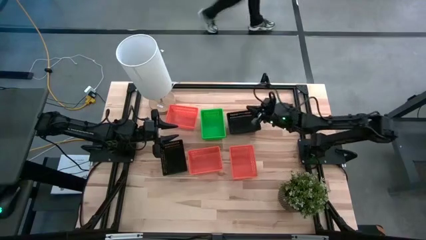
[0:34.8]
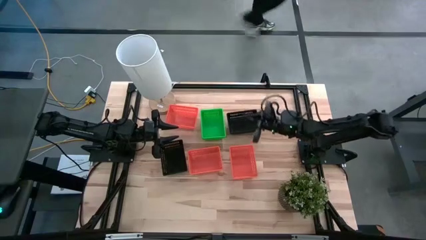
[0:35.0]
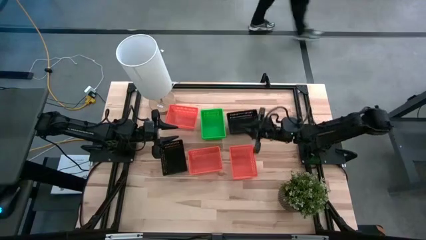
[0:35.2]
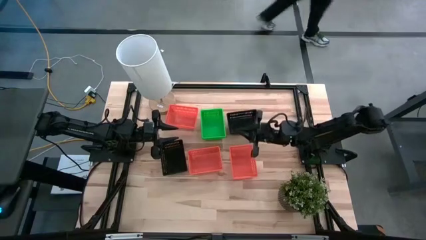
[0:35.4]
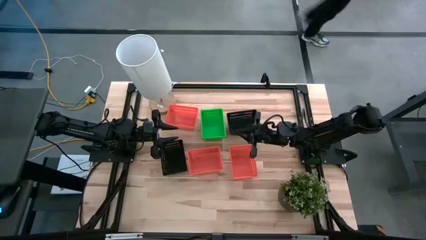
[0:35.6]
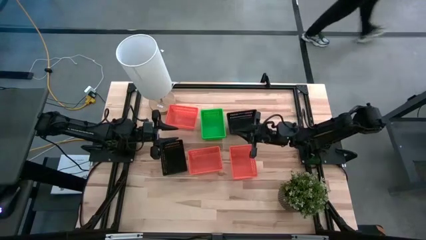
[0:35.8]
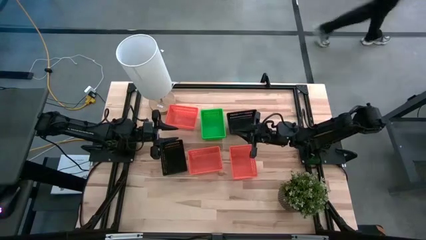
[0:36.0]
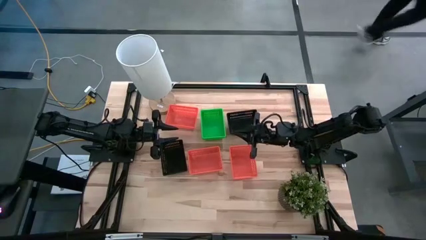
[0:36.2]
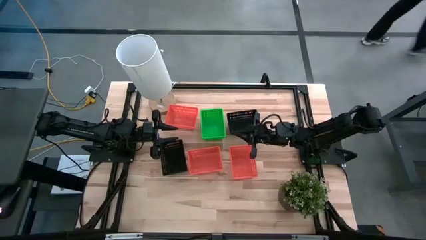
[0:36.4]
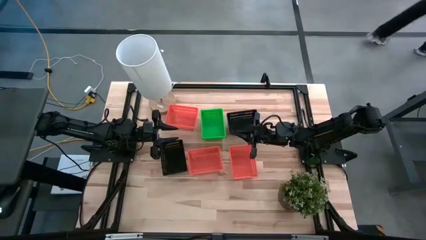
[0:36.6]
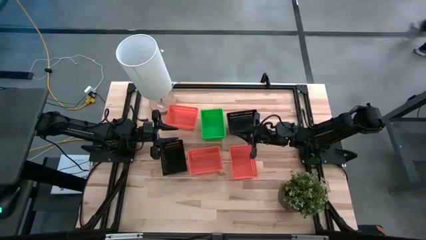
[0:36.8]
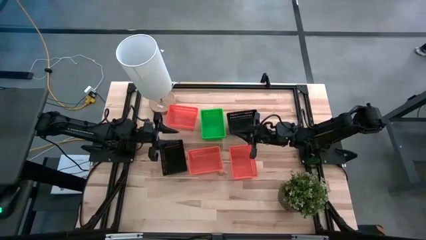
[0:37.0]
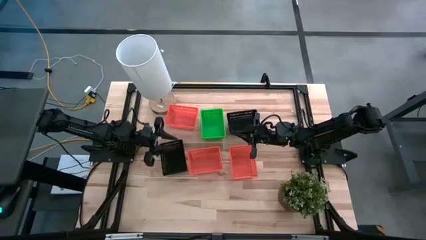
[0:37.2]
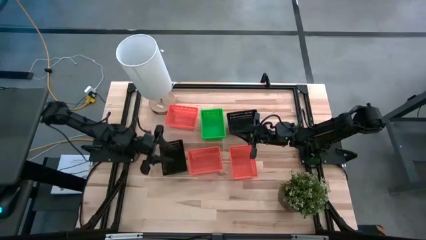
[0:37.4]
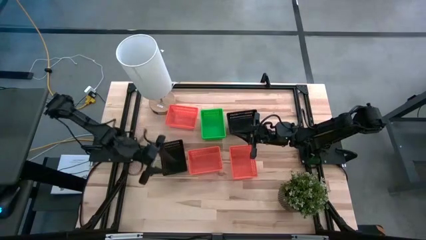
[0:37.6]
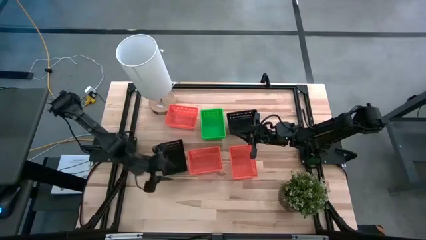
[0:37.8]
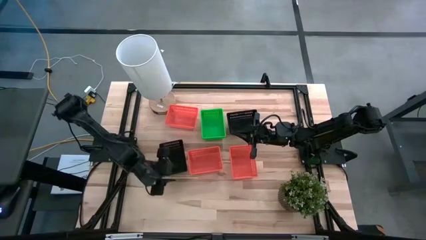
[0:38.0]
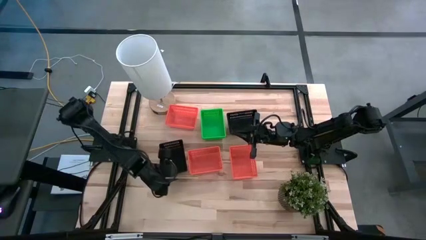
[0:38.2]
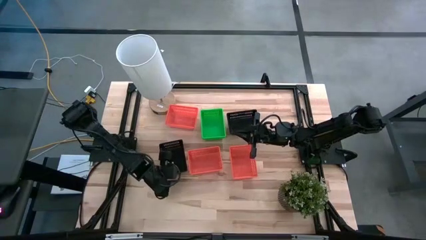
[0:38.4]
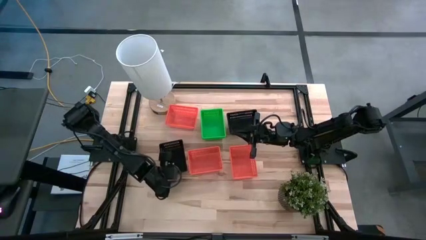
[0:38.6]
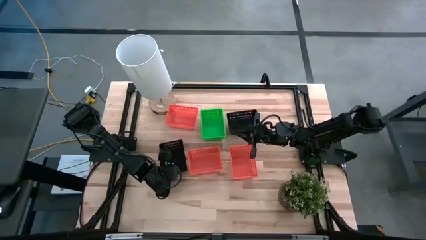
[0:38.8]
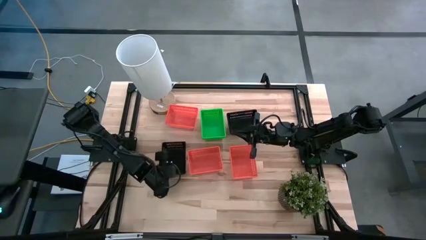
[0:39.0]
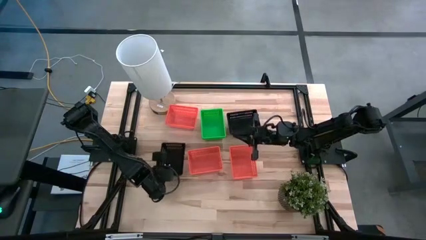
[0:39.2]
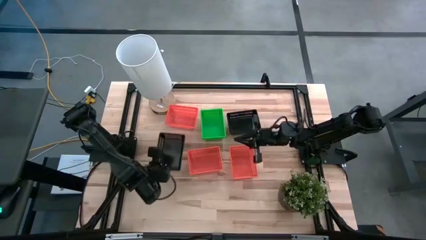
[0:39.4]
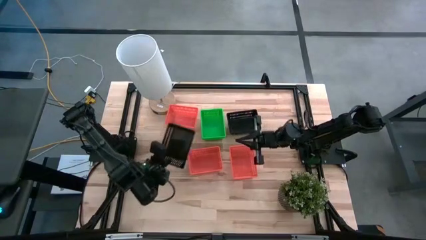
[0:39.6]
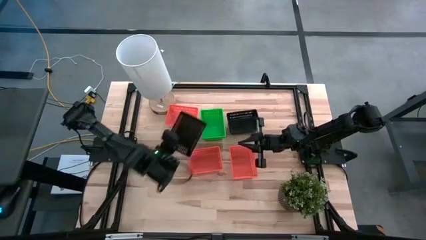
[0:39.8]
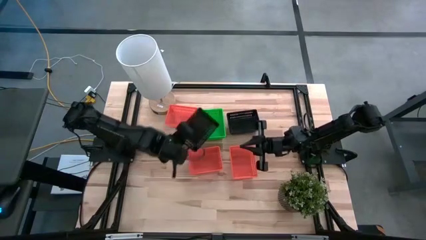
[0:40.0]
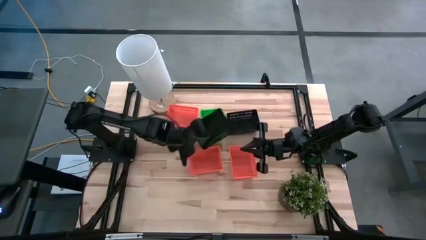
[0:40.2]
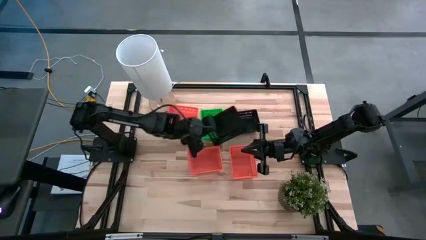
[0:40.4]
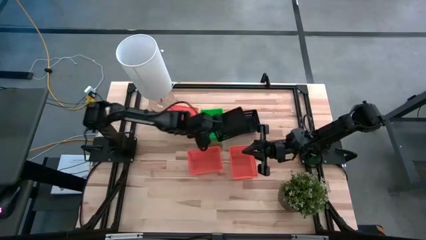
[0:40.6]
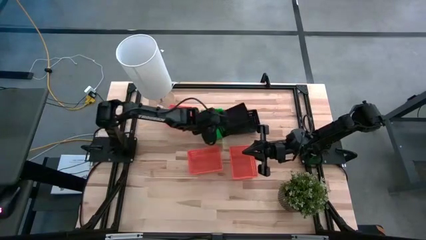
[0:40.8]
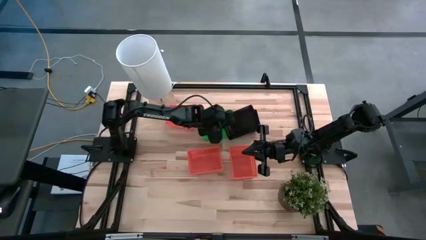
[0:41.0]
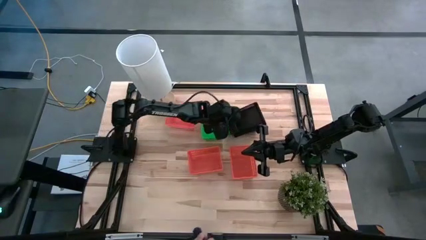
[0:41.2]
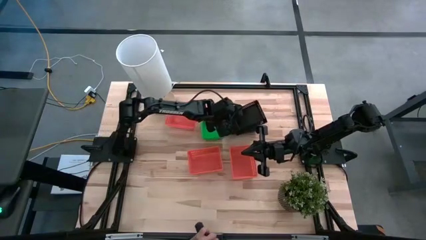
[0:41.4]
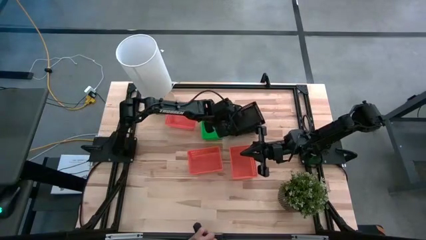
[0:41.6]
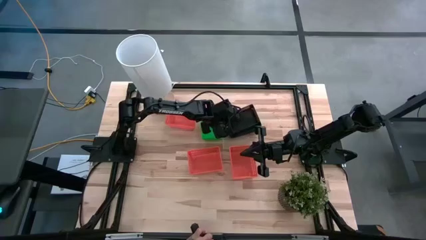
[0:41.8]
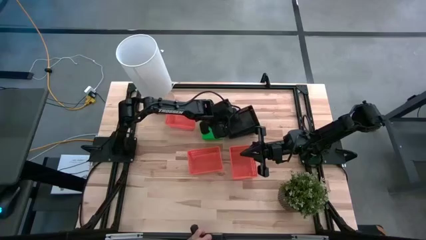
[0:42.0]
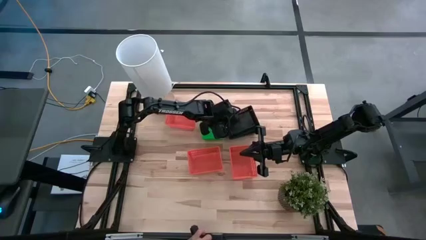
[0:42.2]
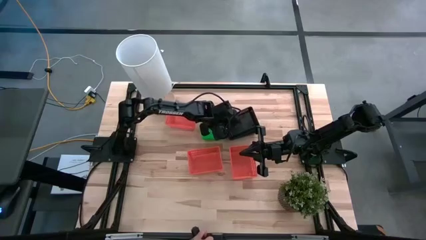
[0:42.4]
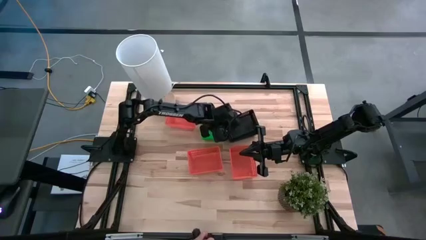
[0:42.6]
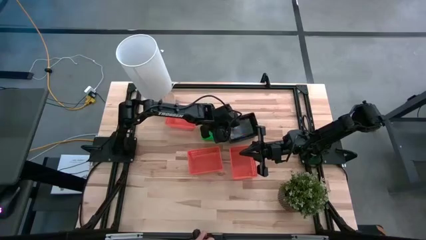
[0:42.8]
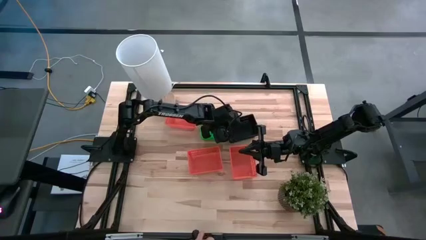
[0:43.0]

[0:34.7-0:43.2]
Stack the bottom black bin on top of the top black bin

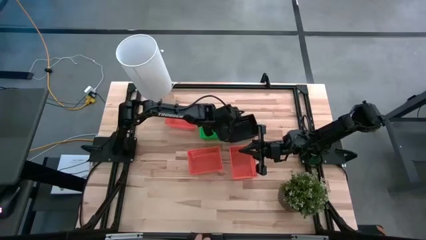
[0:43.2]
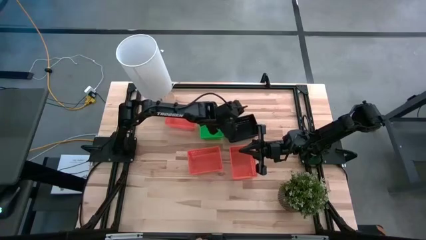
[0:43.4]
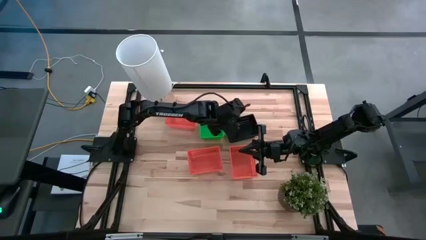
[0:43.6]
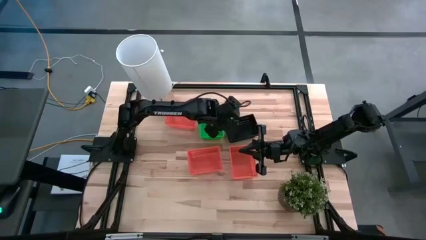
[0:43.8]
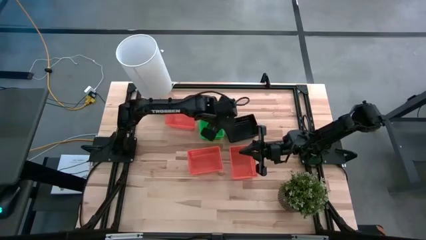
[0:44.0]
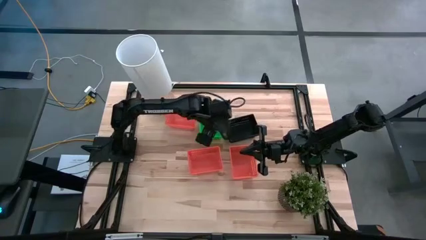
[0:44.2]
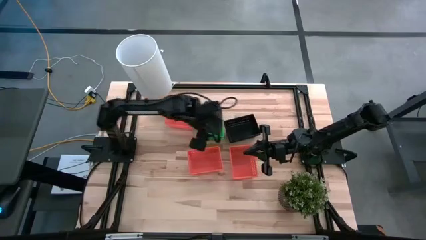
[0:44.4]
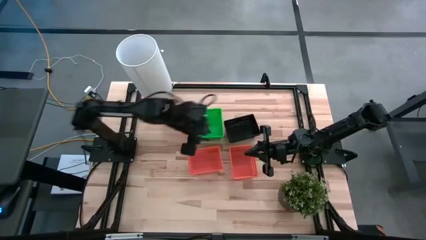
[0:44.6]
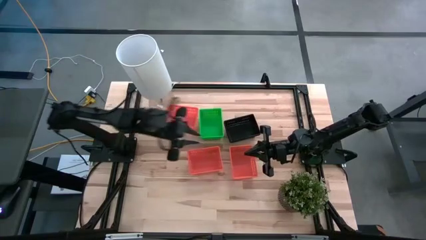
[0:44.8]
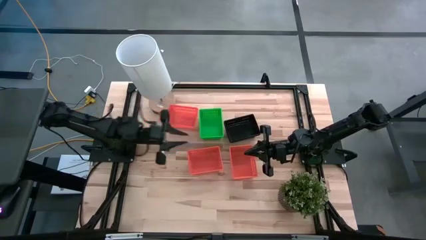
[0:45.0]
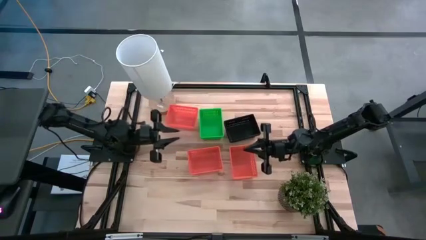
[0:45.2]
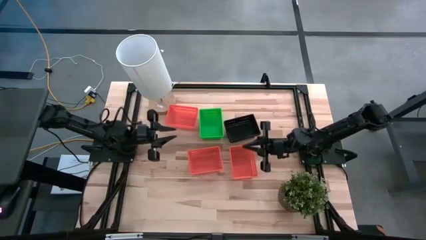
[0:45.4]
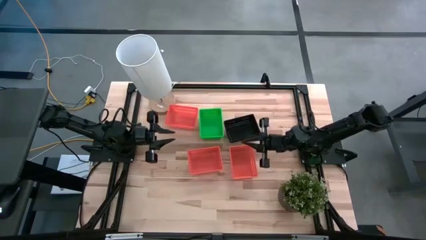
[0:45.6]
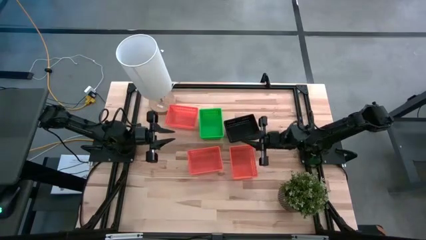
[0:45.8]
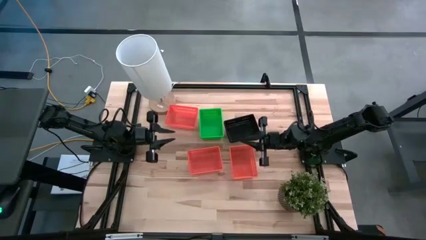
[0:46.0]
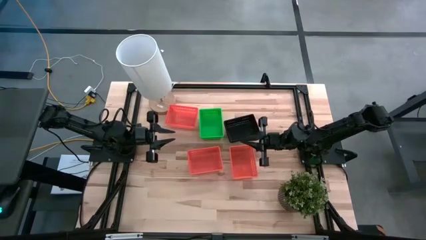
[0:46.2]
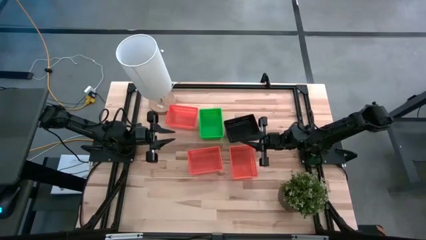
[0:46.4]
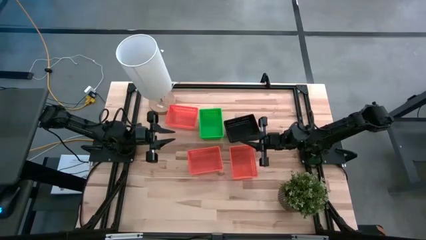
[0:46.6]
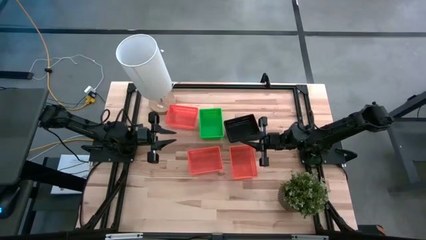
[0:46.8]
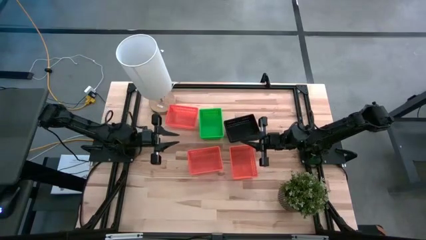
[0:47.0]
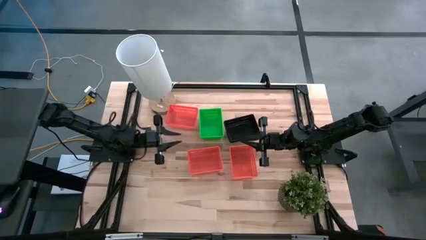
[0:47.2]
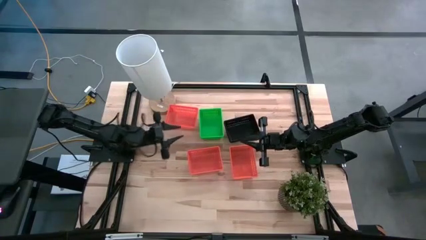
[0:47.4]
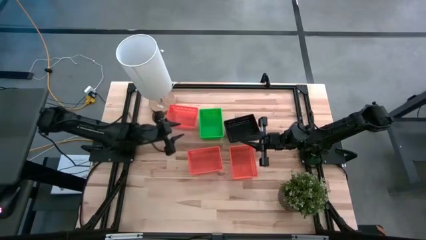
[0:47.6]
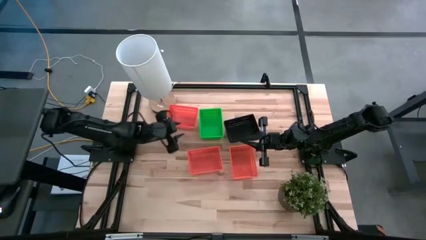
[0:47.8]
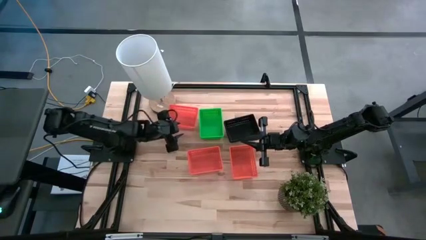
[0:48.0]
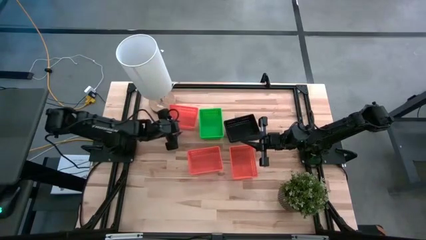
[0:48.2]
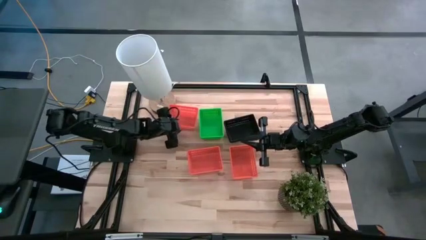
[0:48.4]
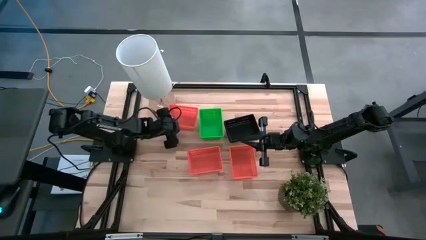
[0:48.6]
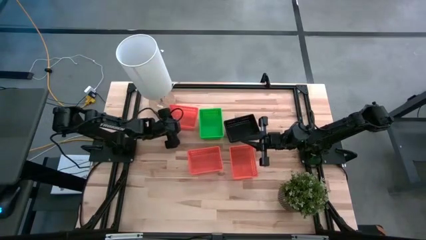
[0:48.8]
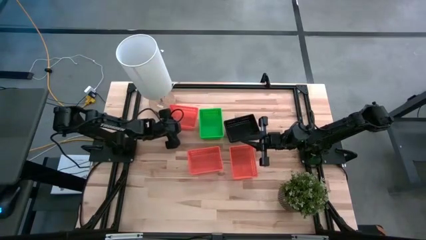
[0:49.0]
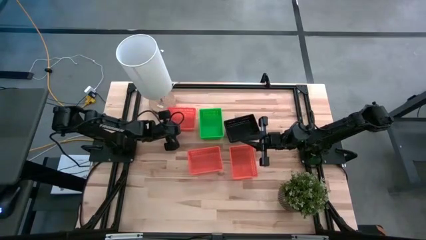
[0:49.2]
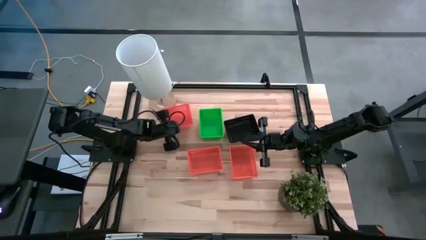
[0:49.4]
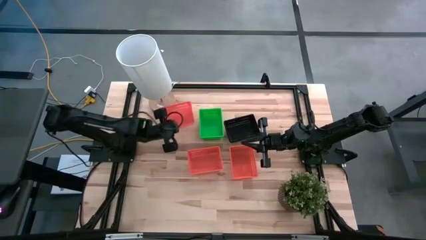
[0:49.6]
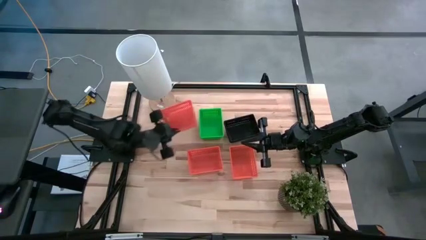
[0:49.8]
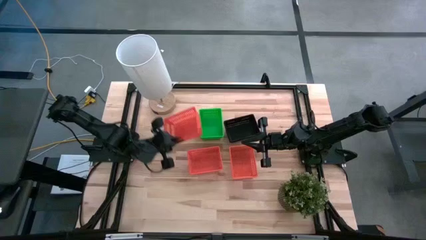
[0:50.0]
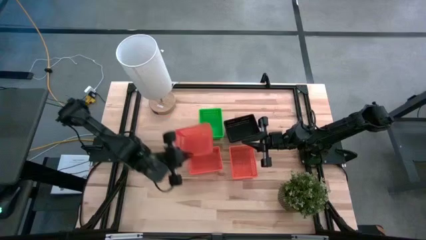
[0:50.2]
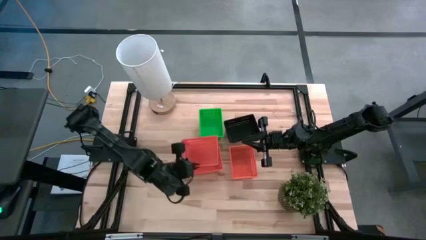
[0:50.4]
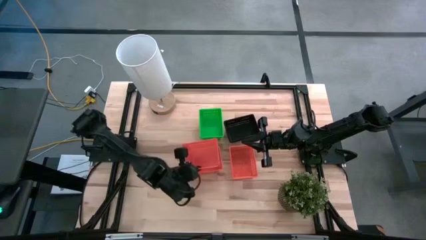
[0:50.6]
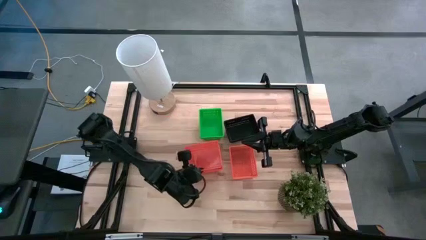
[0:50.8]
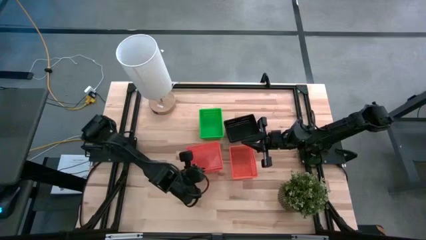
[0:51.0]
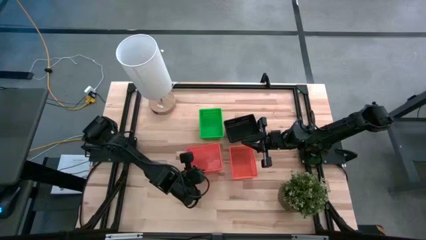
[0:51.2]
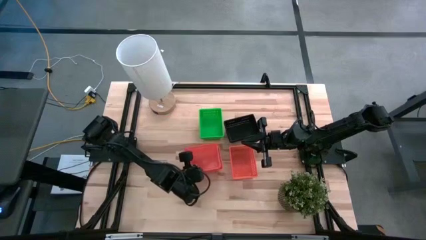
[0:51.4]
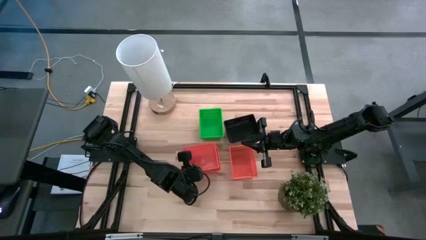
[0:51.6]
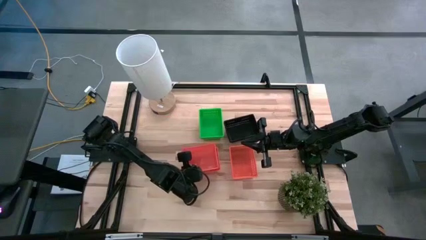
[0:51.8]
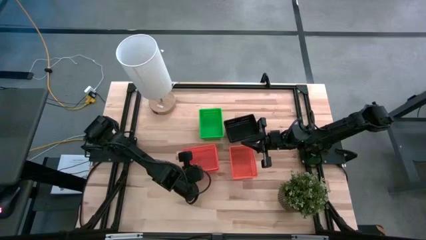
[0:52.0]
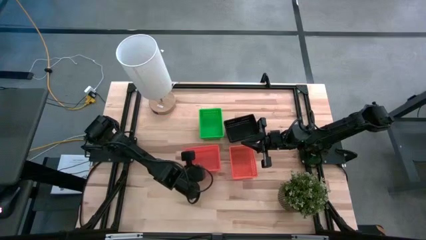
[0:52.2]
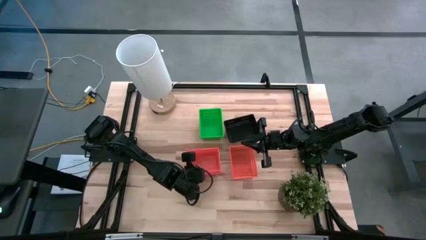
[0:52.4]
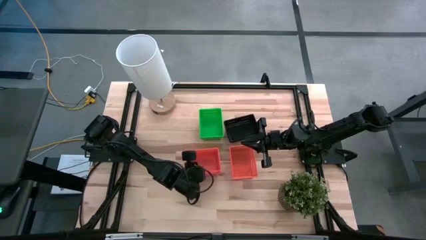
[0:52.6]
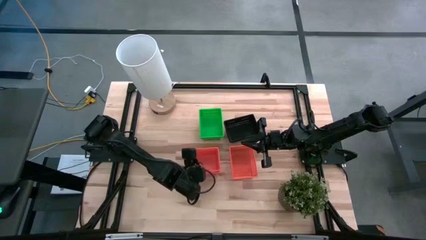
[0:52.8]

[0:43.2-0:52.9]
Stack the top orange bin on top of the bottom left orange bin
